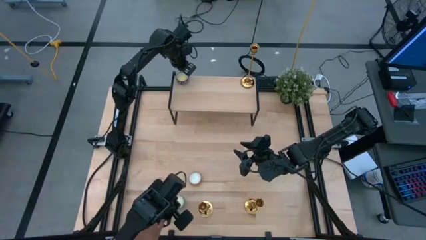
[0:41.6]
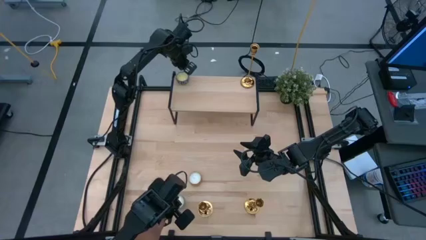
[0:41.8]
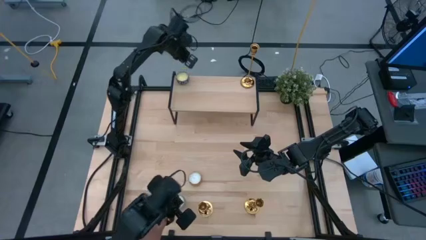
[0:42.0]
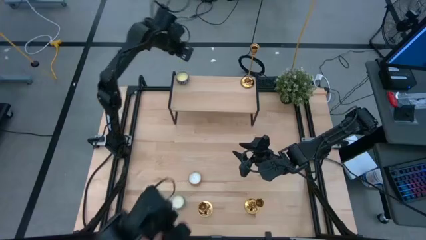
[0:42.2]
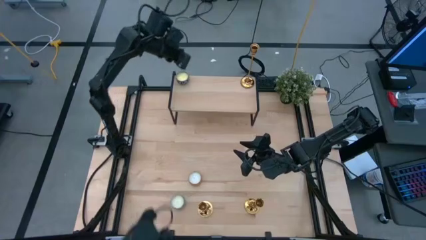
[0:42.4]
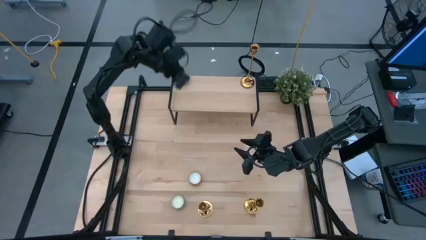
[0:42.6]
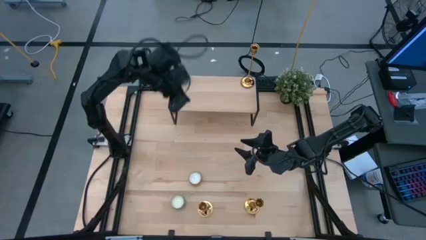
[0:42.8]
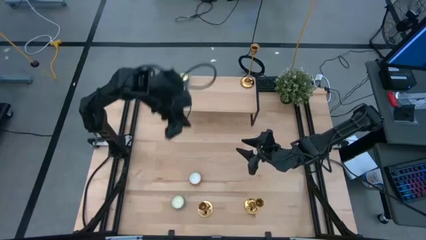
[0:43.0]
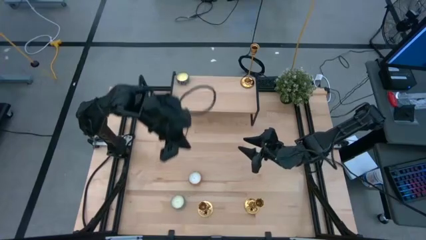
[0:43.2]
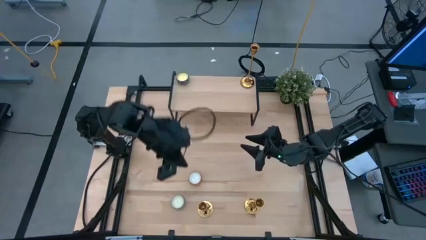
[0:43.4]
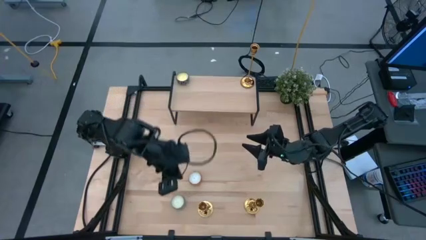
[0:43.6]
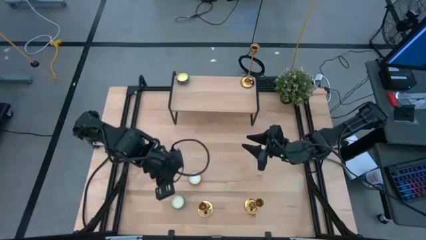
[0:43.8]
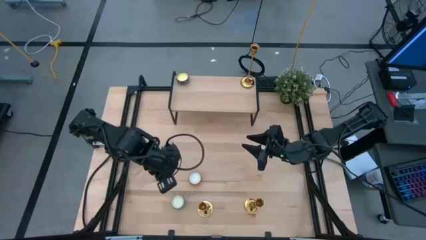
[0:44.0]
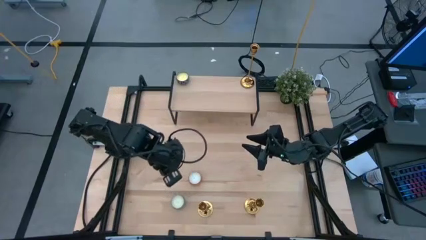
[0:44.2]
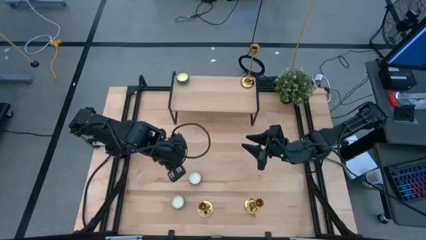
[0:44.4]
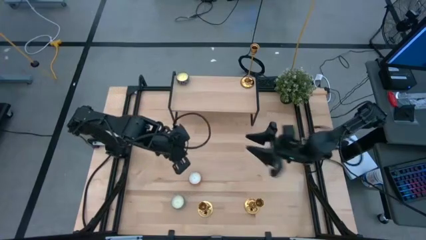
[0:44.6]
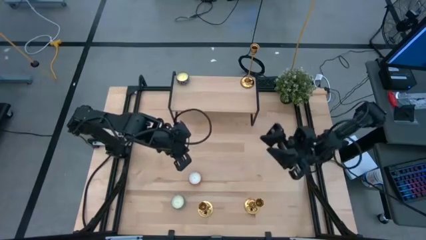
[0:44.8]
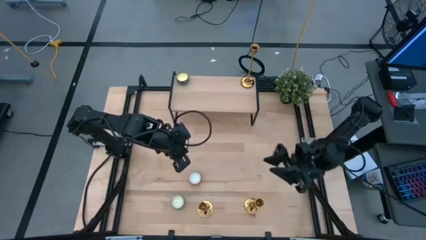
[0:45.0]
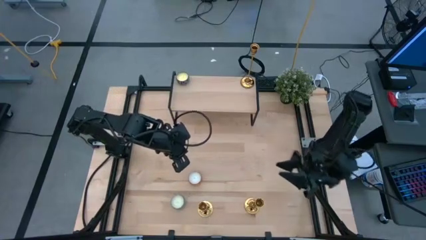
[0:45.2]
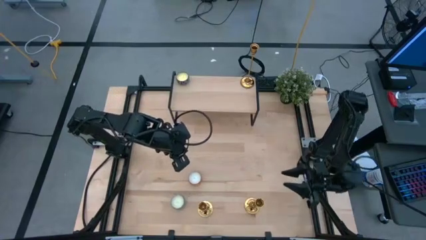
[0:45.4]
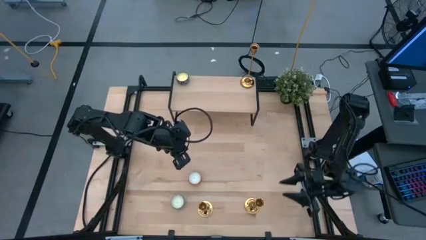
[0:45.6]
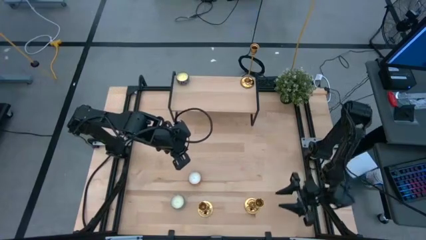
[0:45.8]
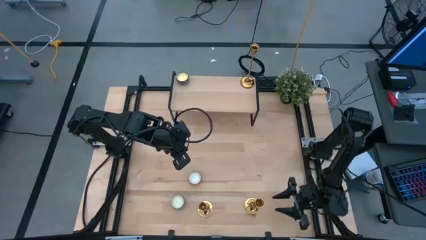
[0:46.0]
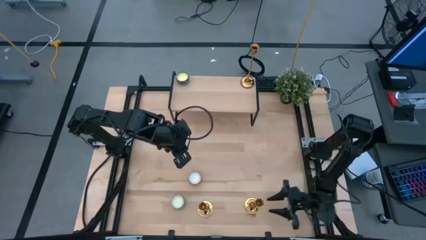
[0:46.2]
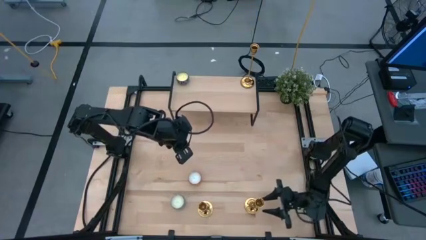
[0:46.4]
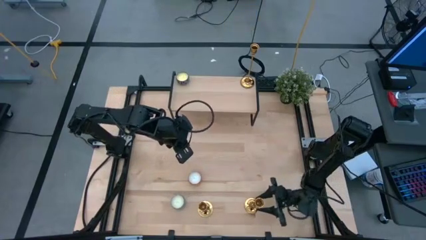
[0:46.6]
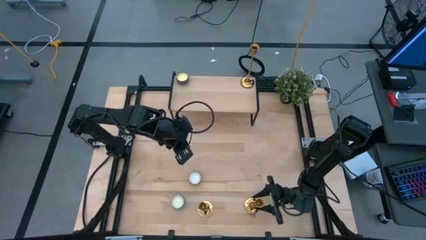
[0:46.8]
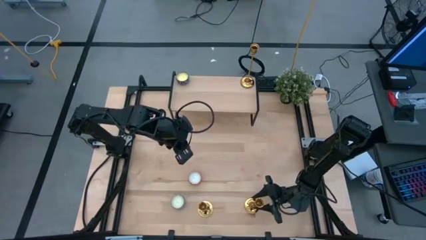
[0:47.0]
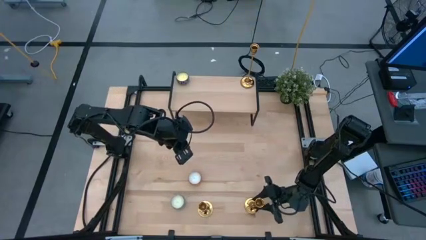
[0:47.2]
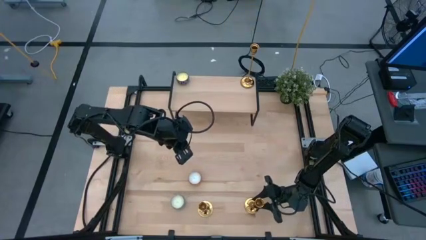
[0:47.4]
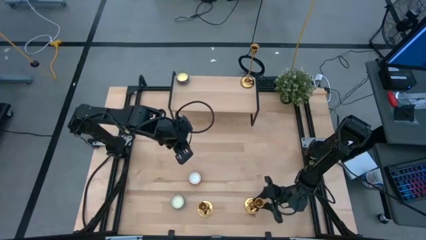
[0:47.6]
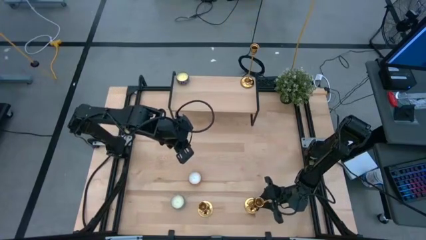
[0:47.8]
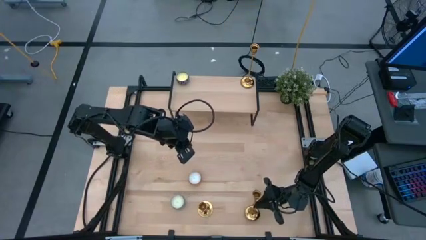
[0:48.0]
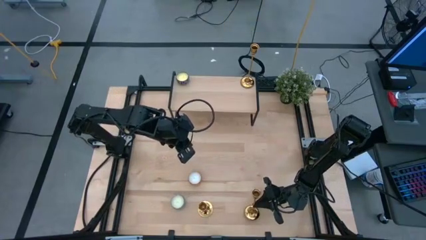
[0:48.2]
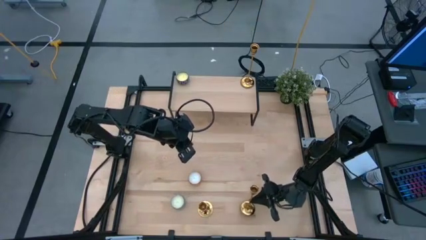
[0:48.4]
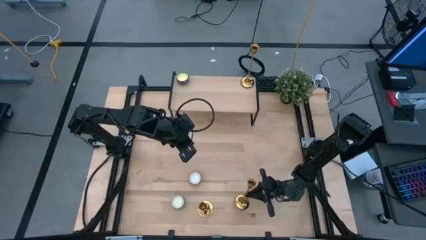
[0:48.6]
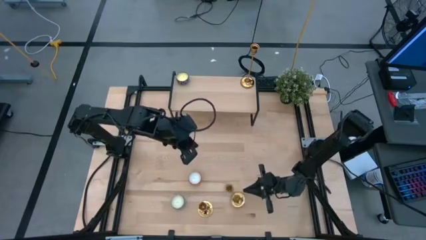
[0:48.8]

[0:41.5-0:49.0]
Task: Pick & Place candle stick holders
Put the right gold candle holder on the shelf aligned with the other gold candle holder

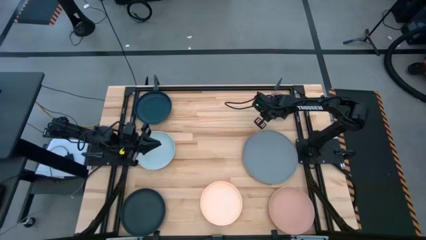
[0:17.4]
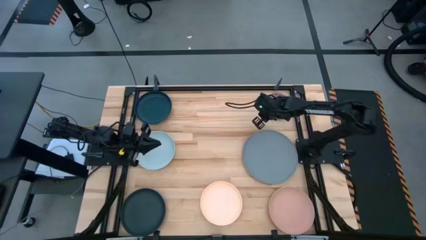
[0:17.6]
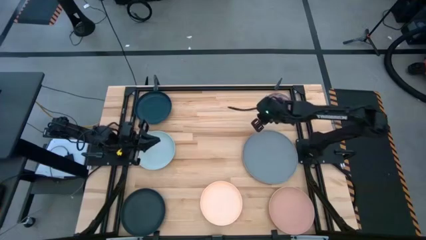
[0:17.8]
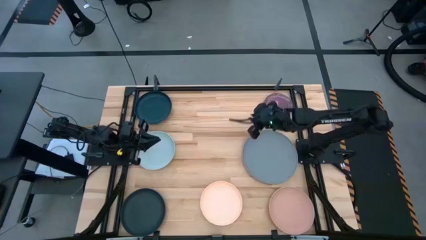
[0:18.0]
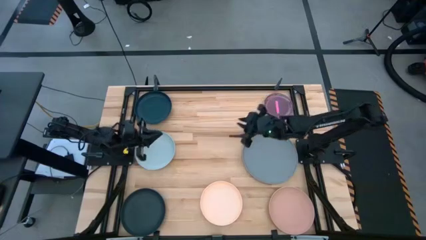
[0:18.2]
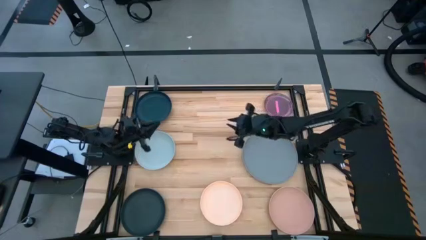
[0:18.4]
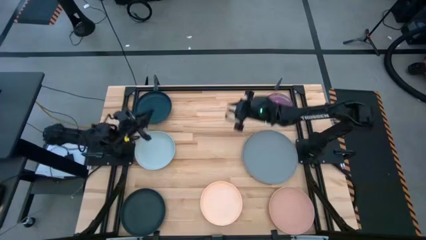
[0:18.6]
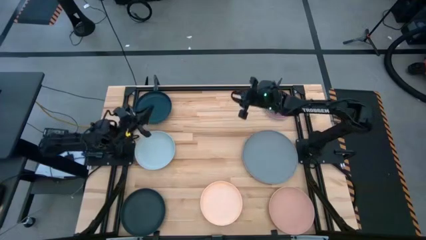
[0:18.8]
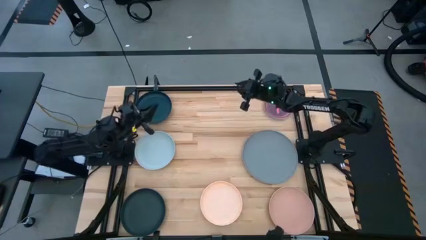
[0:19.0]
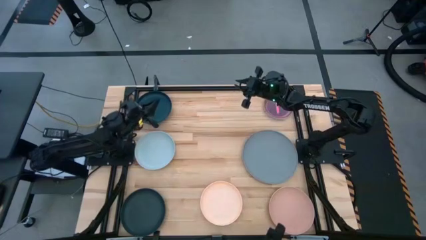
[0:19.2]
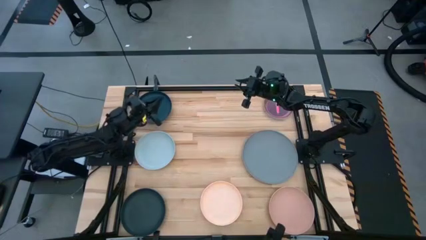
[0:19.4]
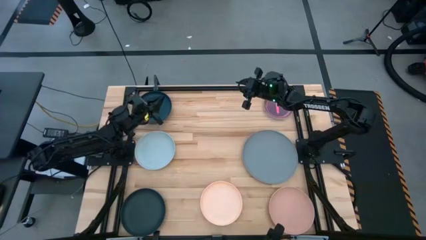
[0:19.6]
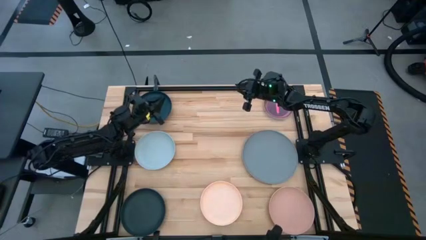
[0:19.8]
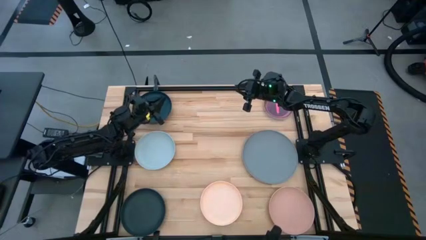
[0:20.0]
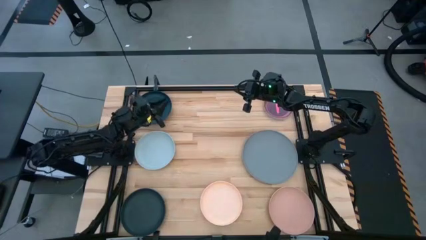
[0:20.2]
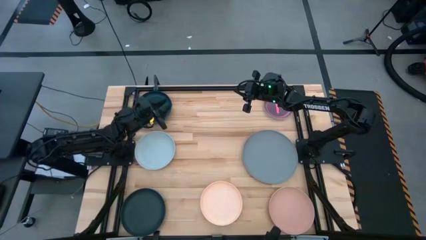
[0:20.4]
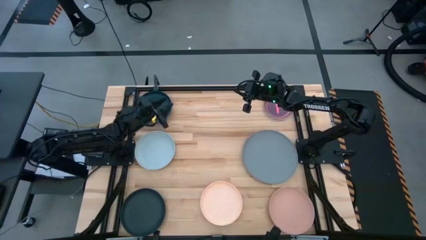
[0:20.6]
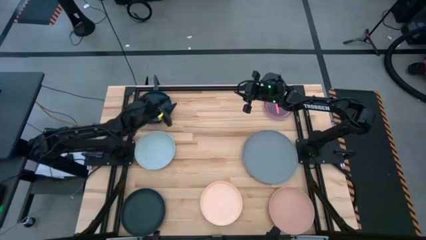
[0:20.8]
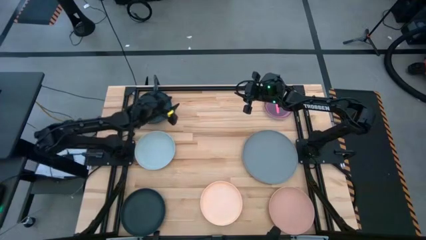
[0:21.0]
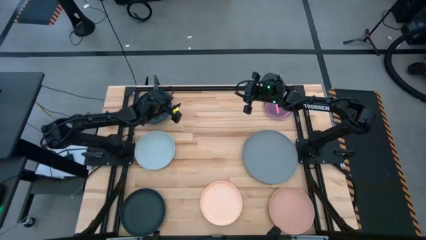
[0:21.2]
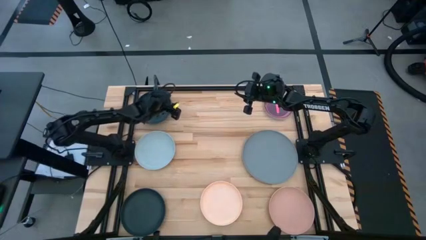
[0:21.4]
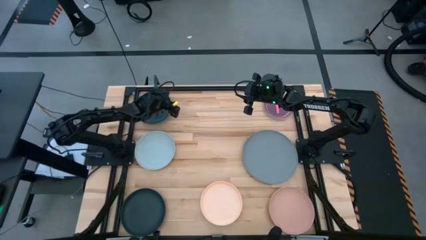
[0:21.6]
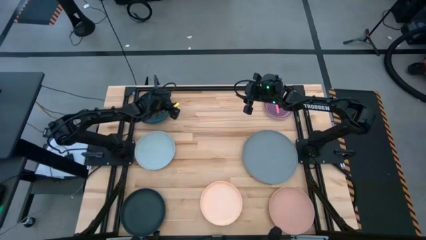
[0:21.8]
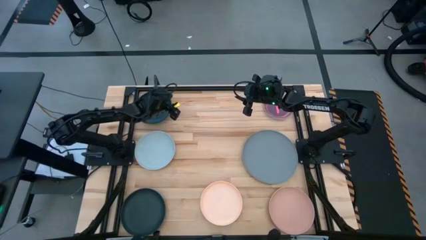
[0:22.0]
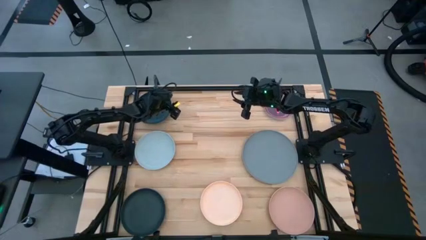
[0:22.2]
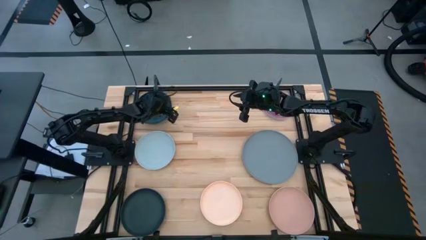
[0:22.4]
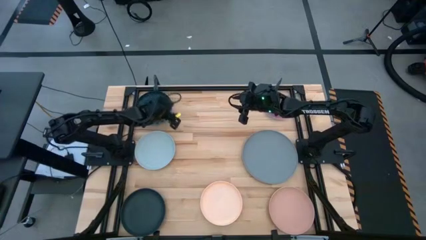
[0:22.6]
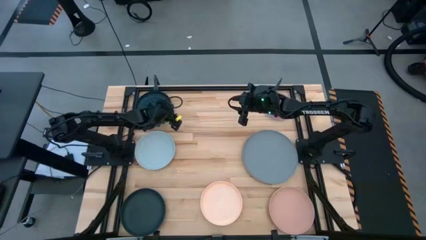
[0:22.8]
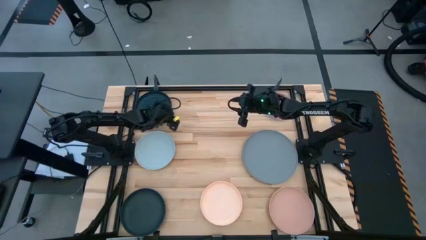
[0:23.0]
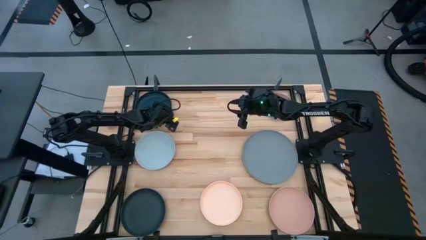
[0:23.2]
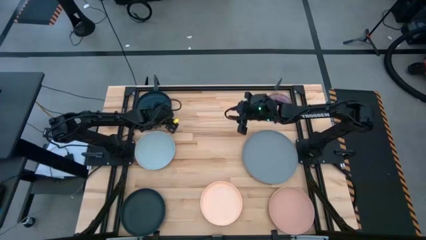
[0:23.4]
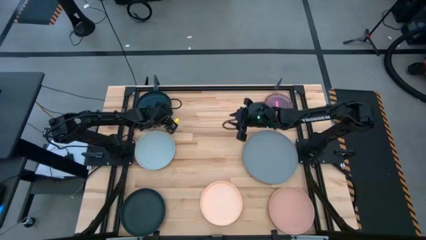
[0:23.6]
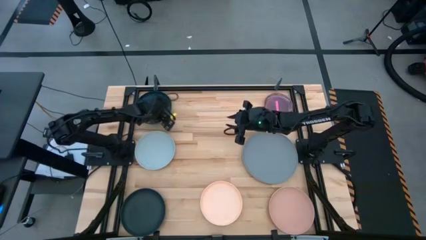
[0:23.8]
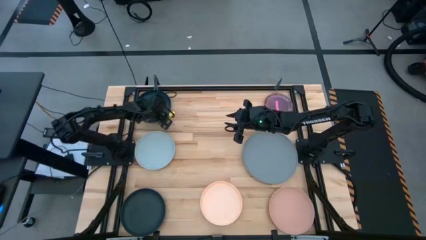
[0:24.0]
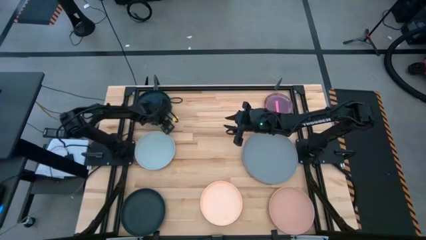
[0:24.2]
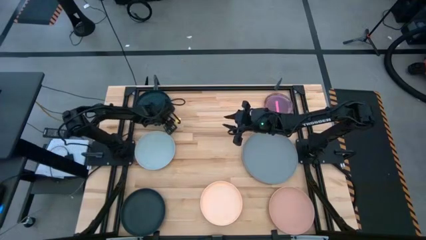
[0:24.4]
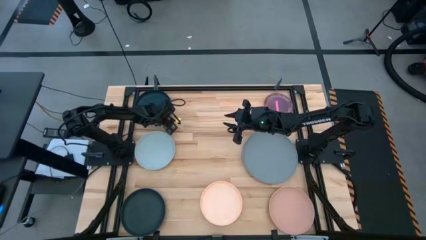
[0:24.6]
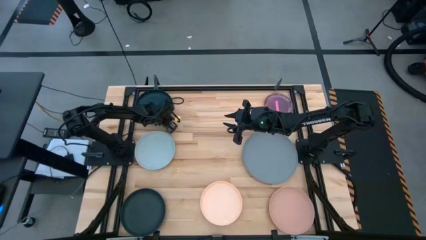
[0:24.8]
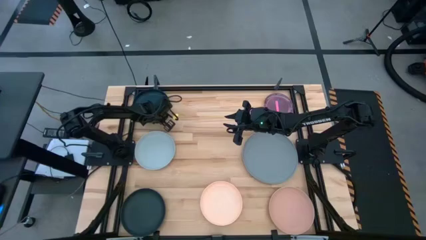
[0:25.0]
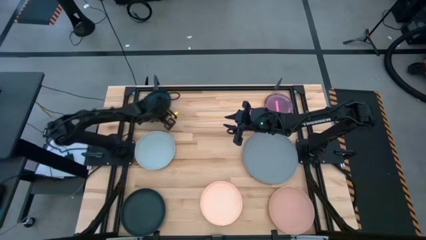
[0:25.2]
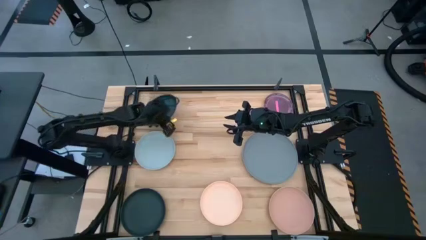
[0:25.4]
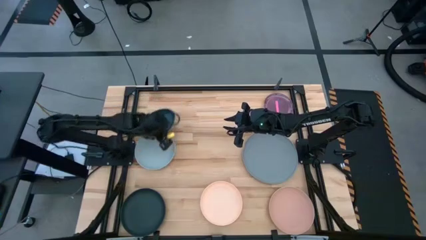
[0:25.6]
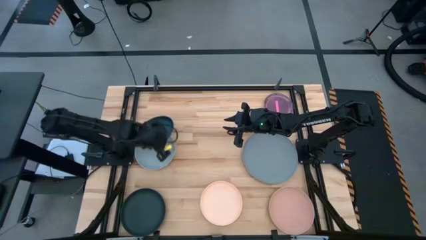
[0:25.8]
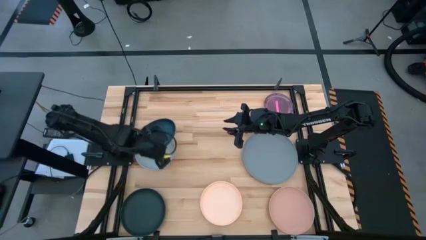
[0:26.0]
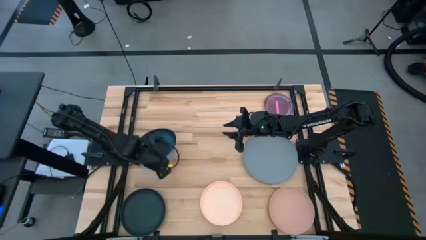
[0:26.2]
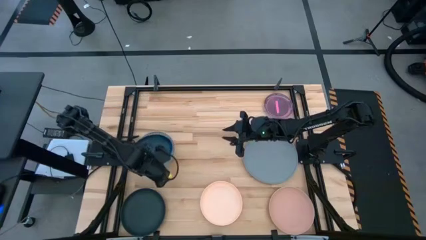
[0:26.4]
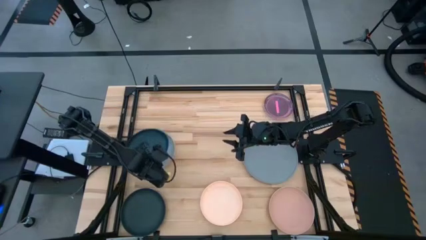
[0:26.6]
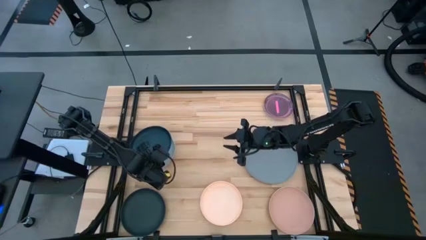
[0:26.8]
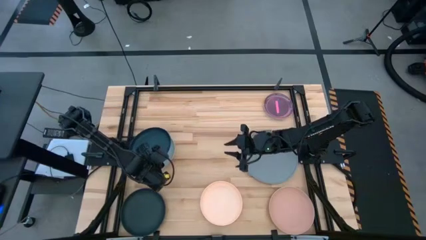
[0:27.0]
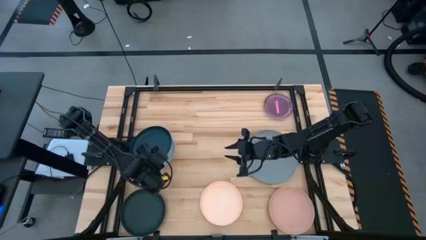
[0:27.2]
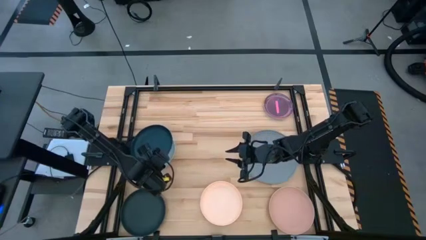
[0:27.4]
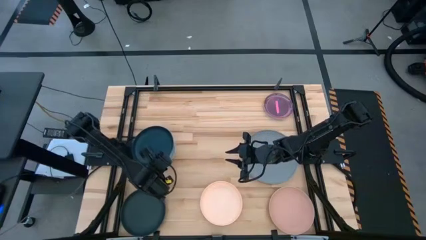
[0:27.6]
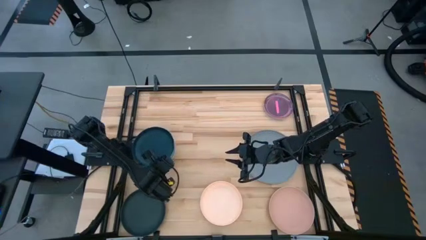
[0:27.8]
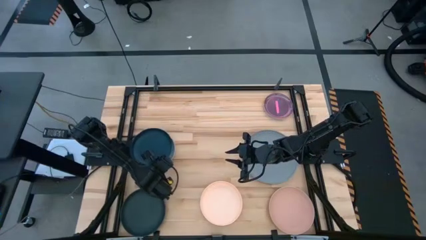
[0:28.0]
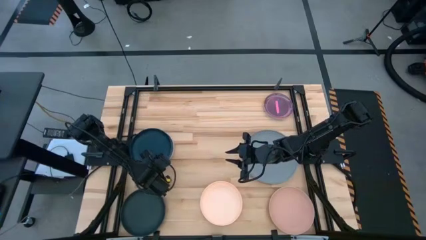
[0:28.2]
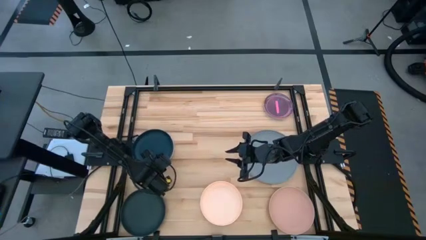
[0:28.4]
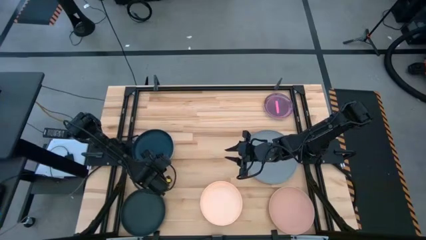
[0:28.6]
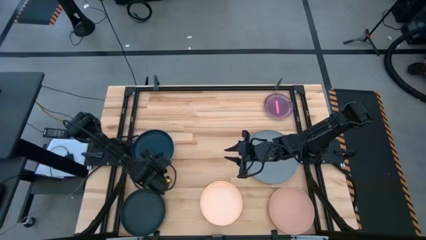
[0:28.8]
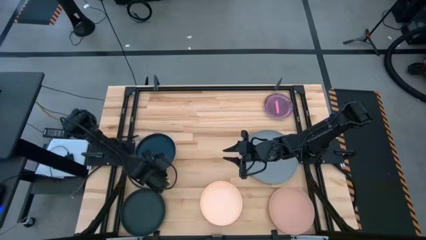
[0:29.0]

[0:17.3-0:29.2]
Task: Stack plastic plates
Stack the top black plate on top of the gray plate
